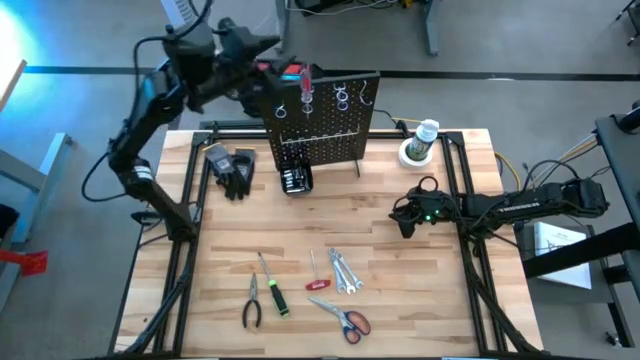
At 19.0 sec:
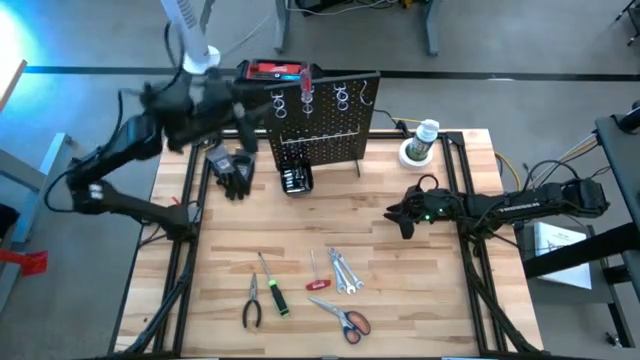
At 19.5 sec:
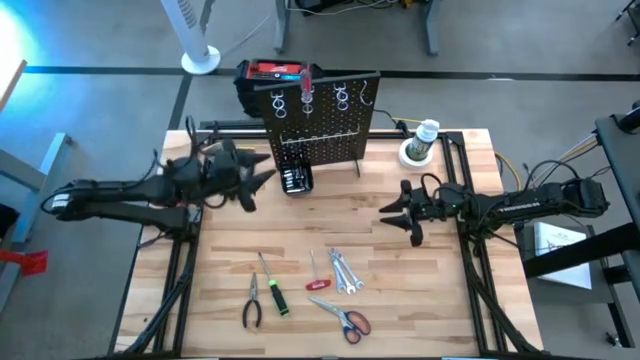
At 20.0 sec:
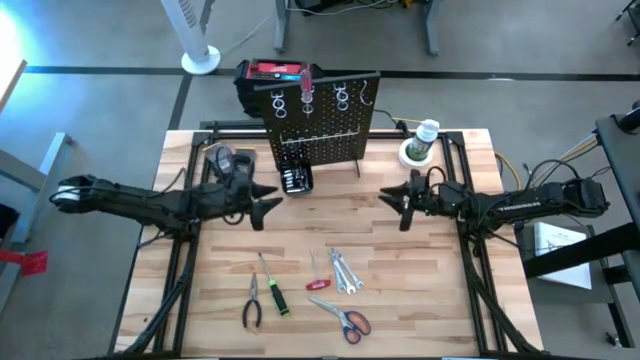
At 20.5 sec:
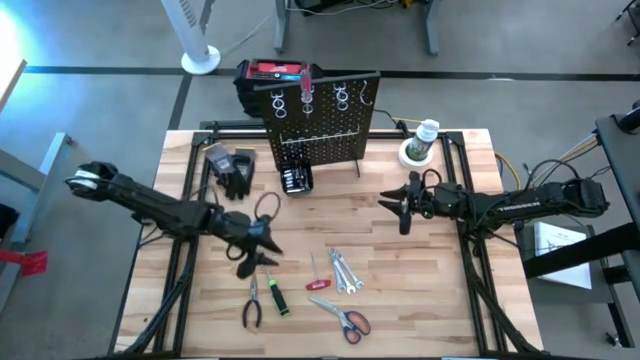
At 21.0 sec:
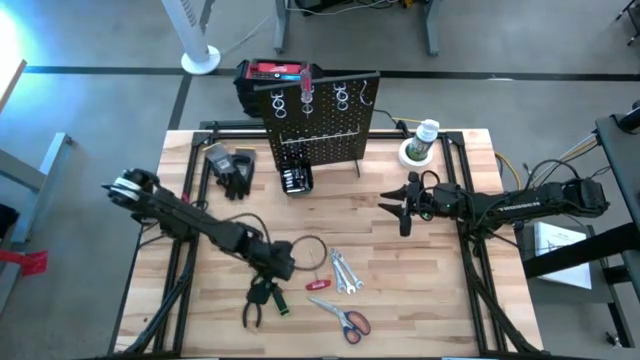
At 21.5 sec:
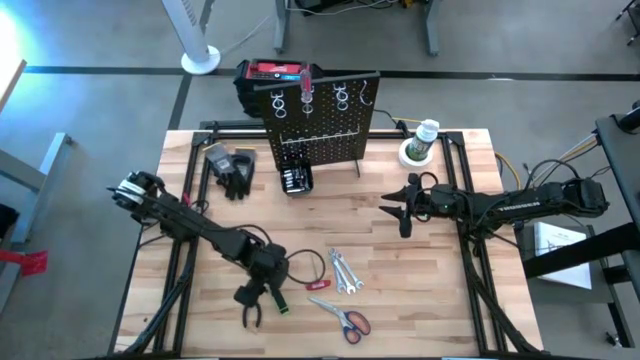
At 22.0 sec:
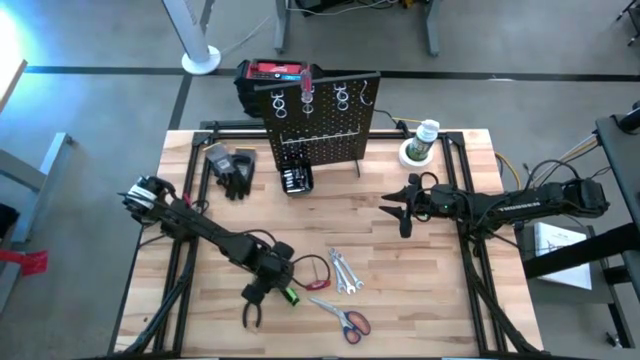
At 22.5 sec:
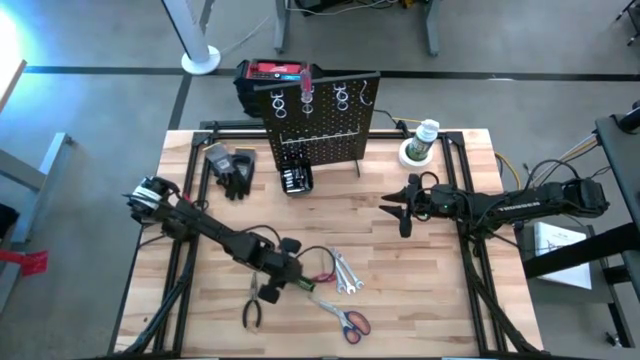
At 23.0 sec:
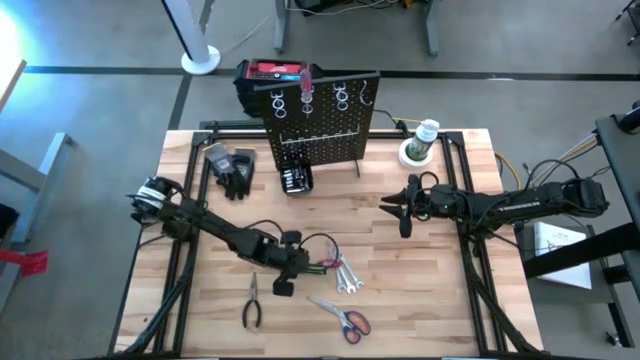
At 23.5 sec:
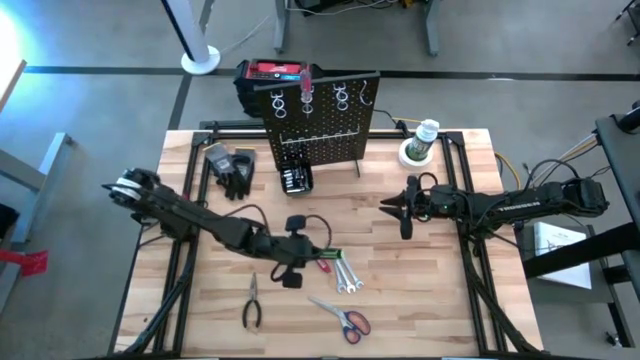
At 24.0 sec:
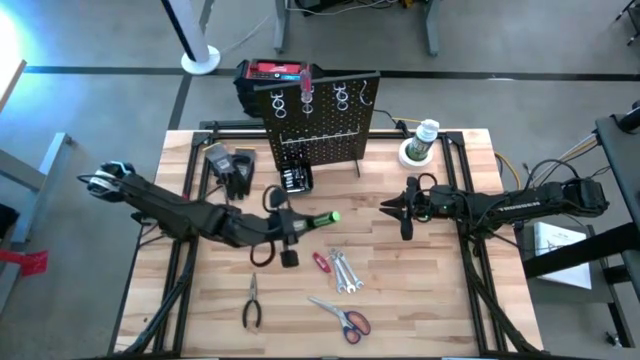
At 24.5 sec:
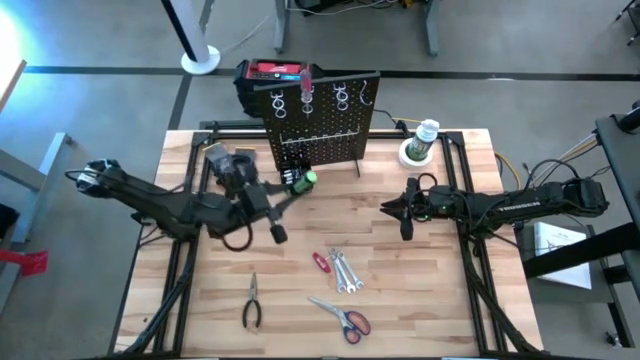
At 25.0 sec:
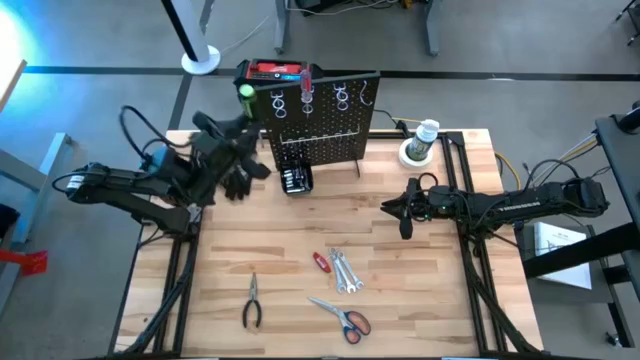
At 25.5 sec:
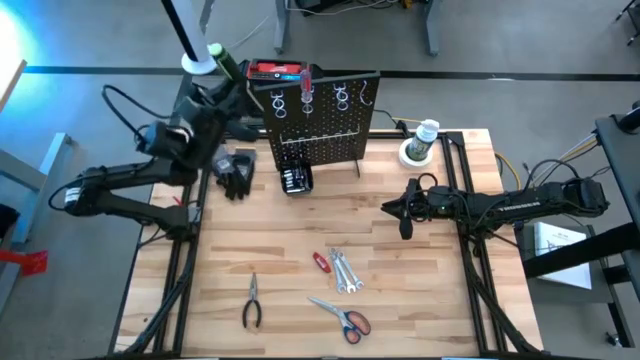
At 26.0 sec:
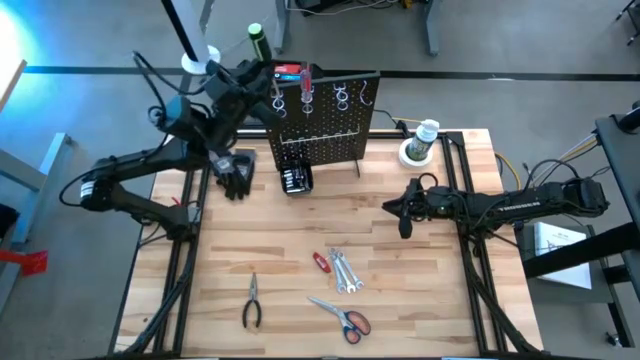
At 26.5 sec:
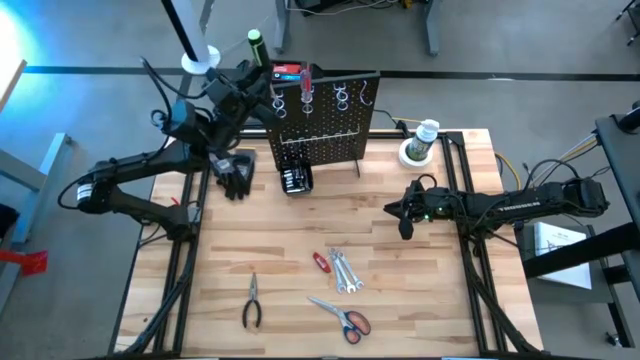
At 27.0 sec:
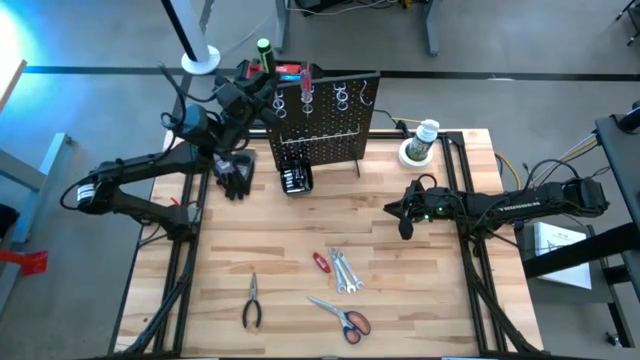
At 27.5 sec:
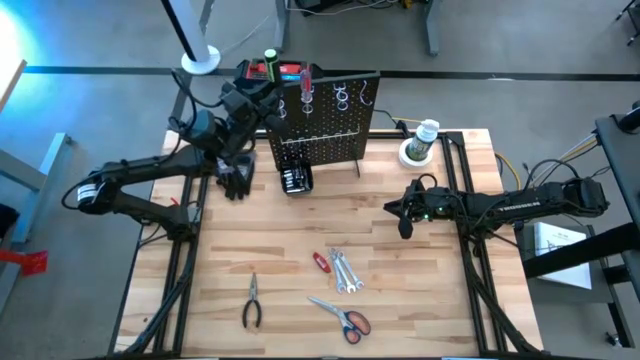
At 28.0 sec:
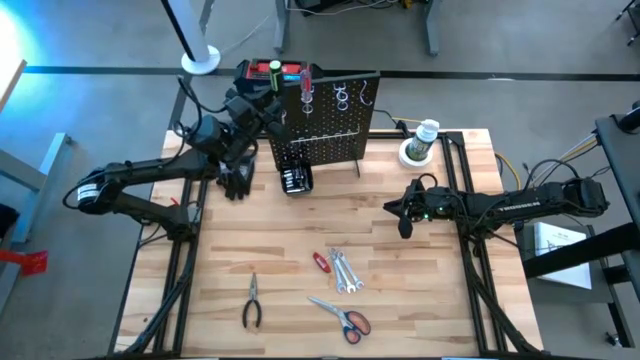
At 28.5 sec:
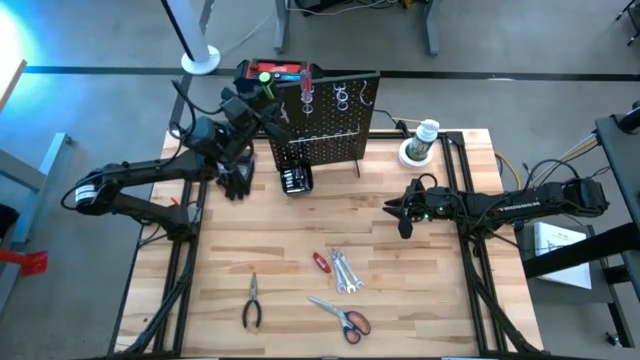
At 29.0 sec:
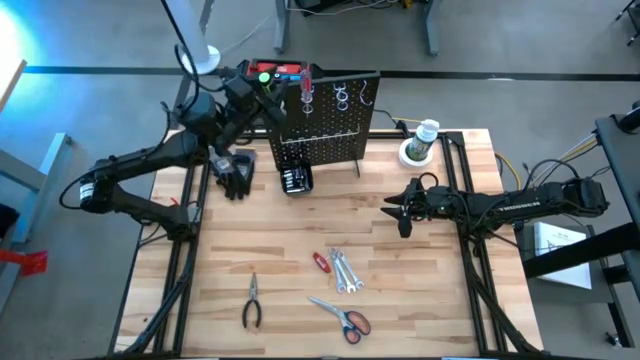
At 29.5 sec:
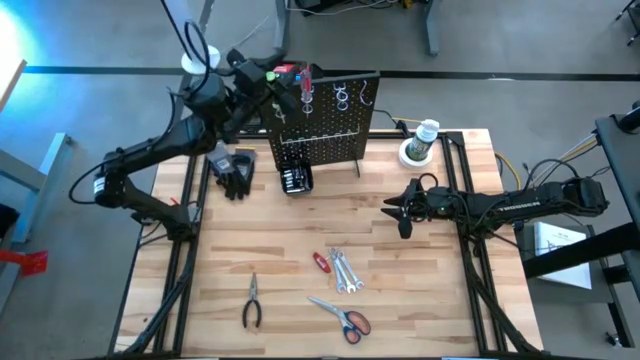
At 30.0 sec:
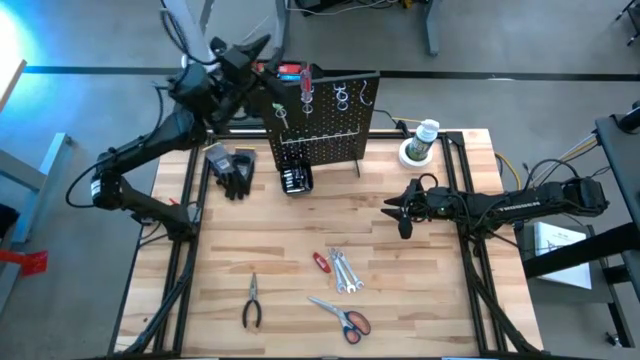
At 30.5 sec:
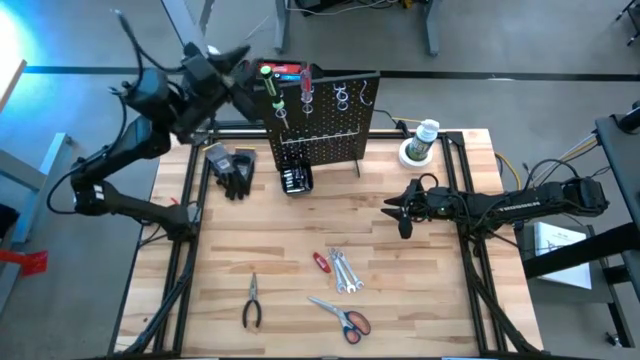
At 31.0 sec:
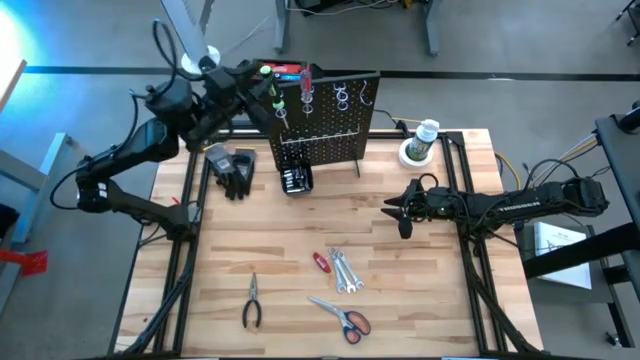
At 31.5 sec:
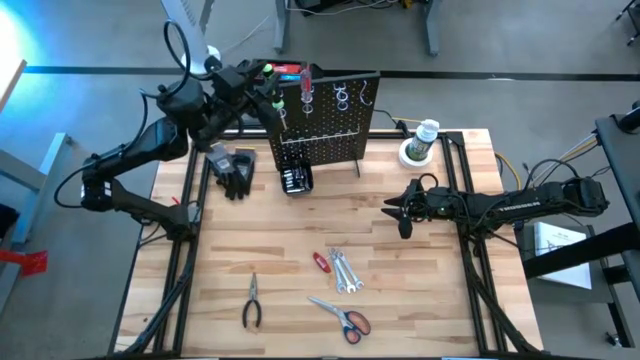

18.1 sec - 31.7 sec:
Task: Hang tools onto peg board
Hang the light green screwdriver on the pegboard

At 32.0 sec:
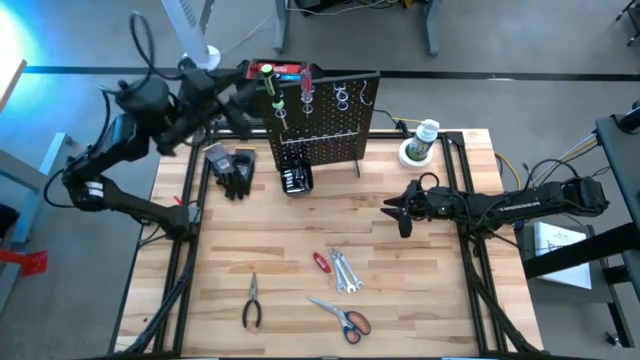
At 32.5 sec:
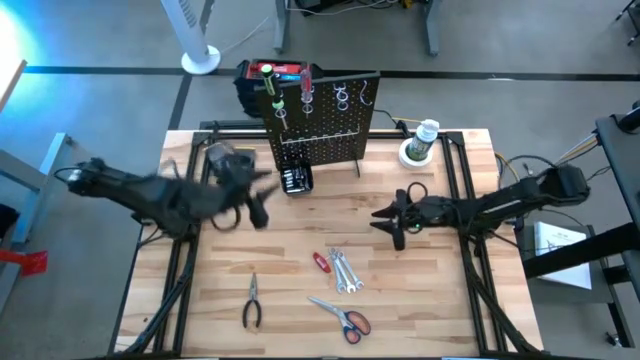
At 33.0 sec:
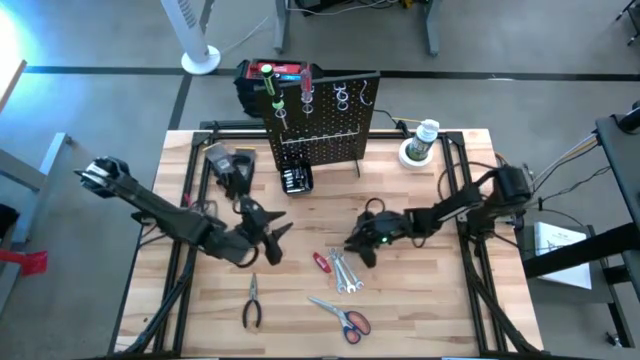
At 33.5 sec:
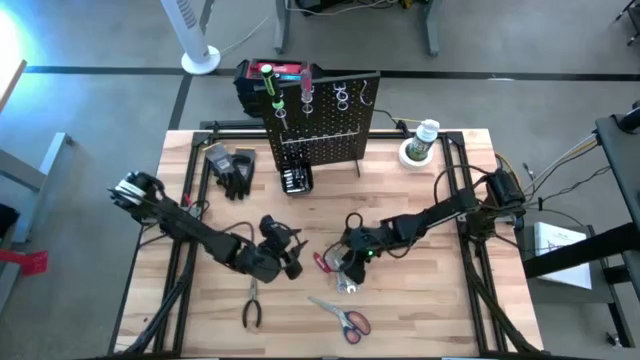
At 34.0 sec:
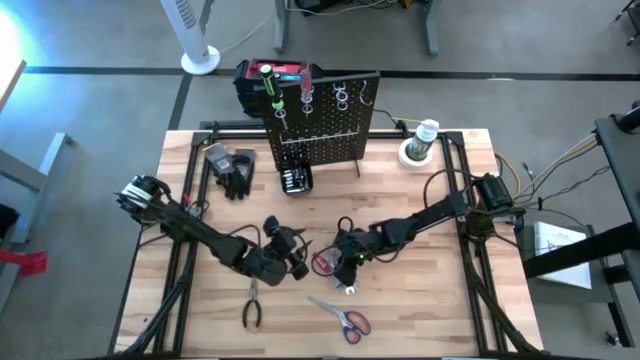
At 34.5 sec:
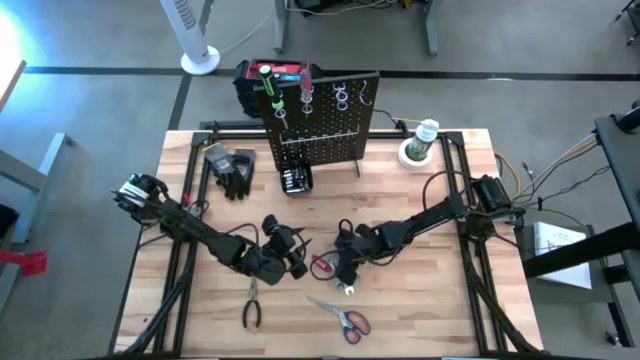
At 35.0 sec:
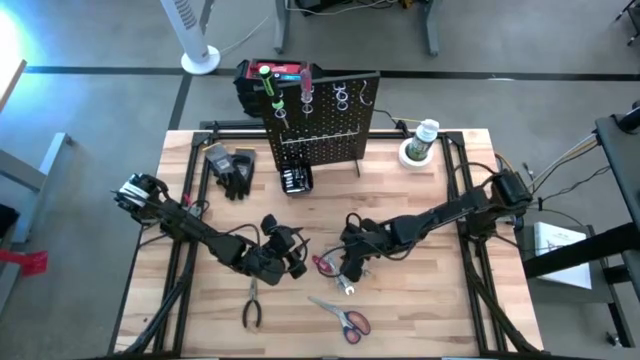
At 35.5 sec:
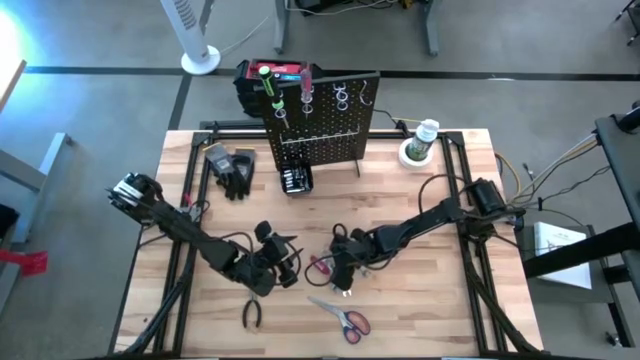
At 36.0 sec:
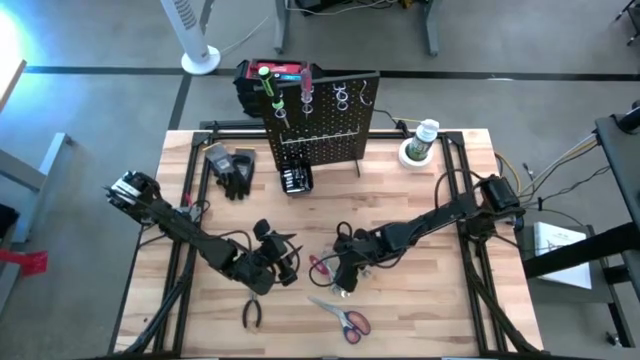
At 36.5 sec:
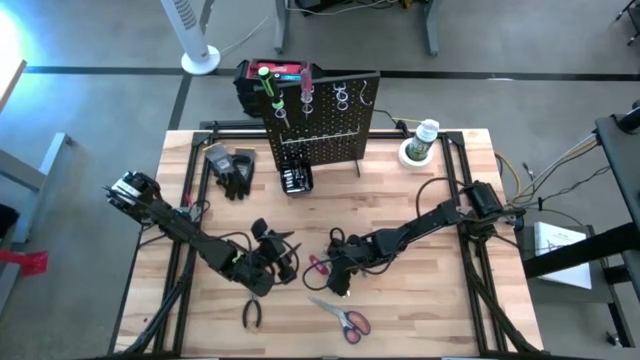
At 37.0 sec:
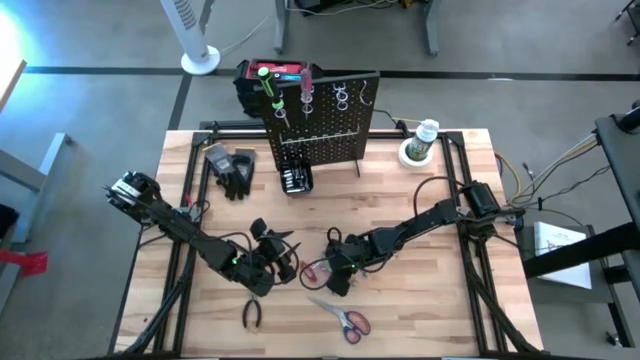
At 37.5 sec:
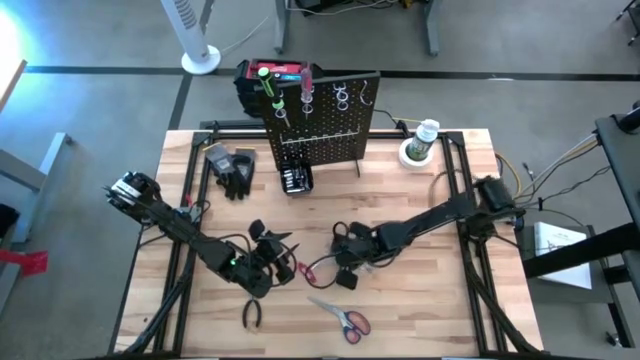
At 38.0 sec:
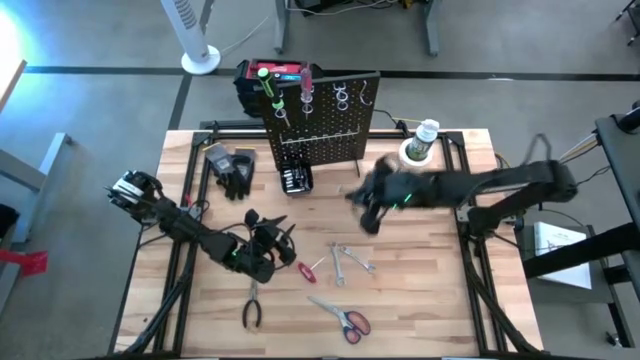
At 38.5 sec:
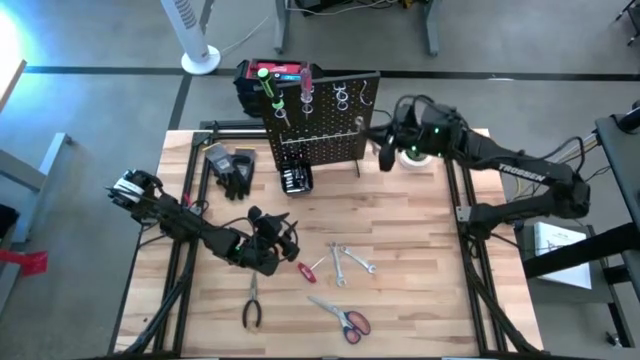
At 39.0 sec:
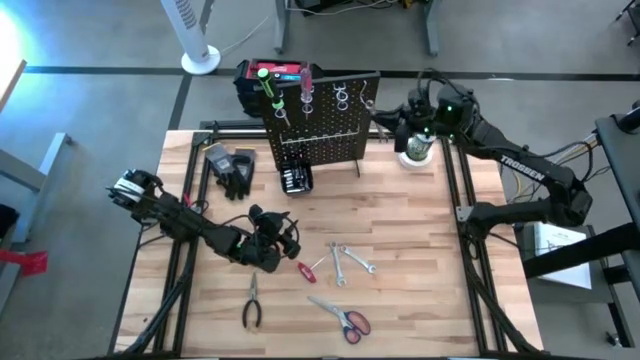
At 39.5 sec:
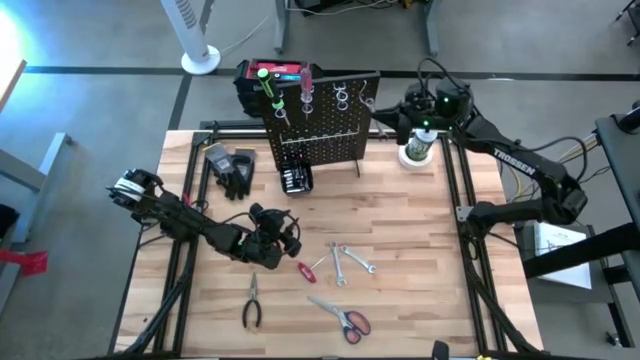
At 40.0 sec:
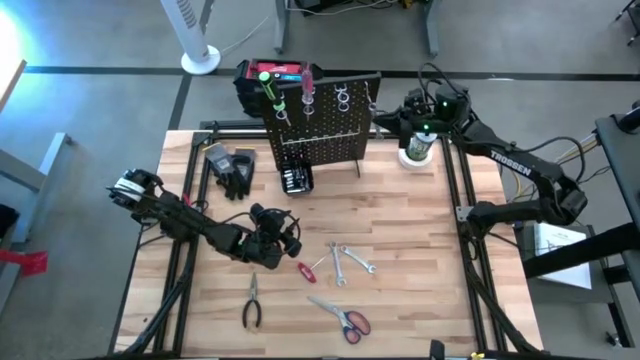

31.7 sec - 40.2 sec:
Hang the center combination wrench on the pegboard
